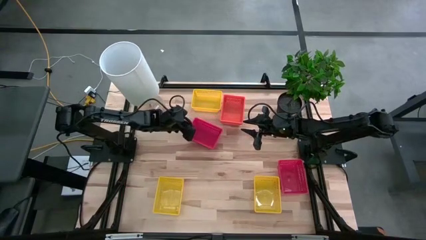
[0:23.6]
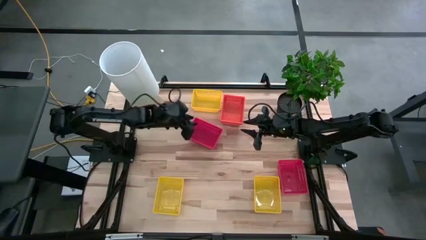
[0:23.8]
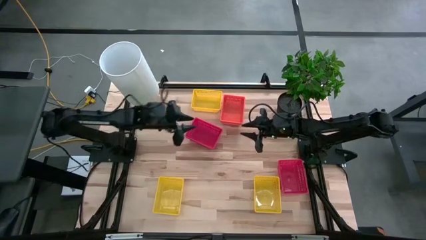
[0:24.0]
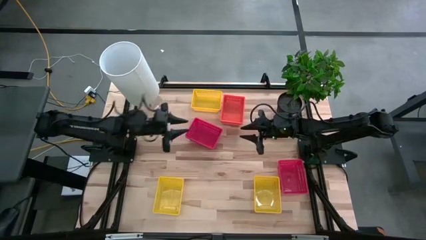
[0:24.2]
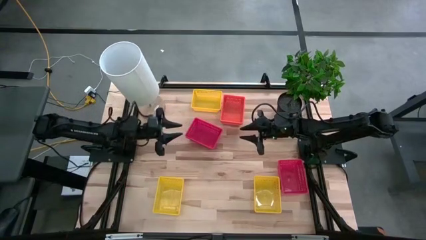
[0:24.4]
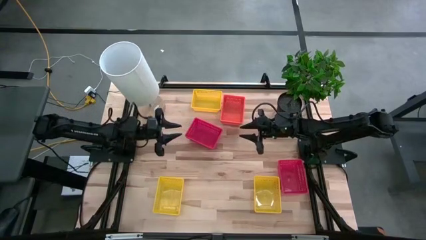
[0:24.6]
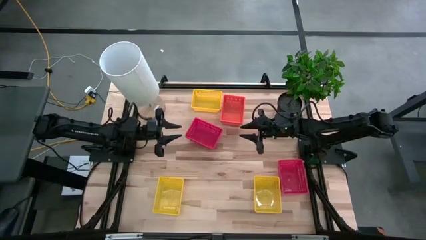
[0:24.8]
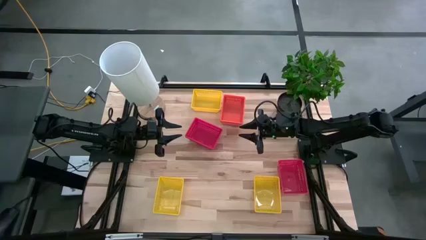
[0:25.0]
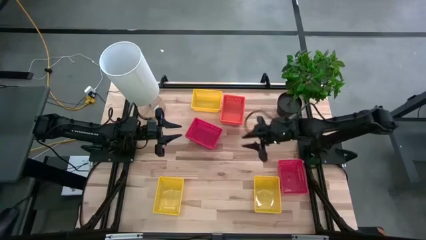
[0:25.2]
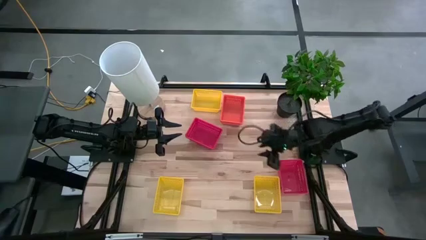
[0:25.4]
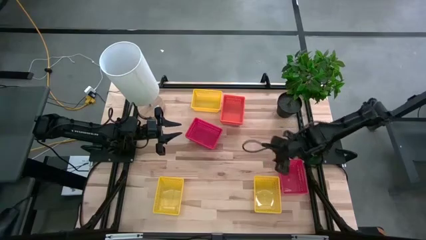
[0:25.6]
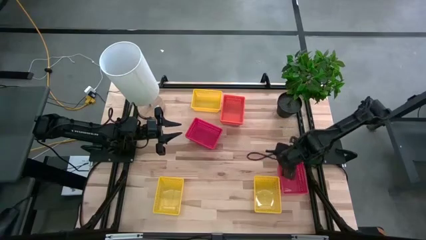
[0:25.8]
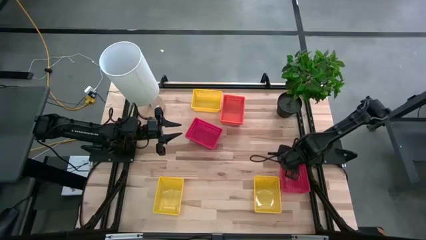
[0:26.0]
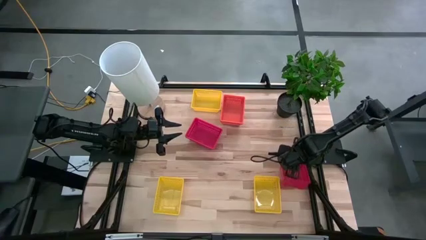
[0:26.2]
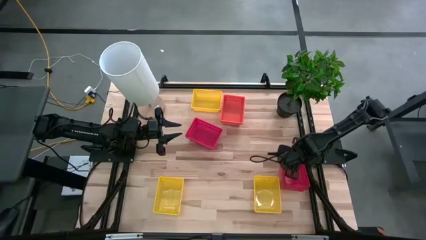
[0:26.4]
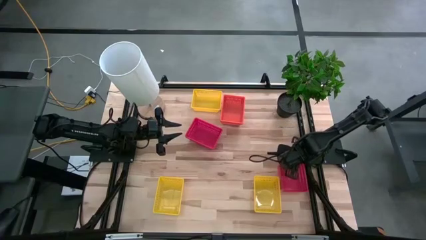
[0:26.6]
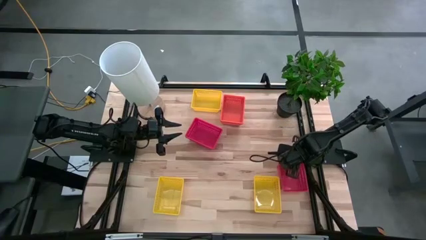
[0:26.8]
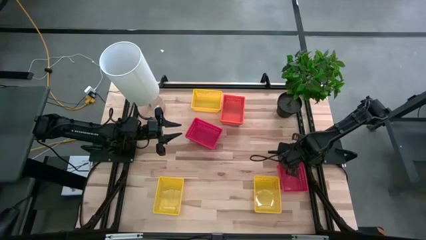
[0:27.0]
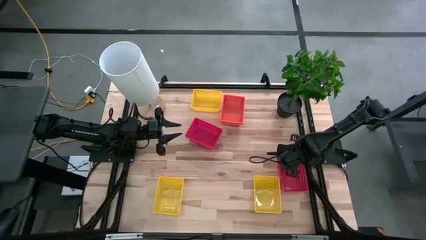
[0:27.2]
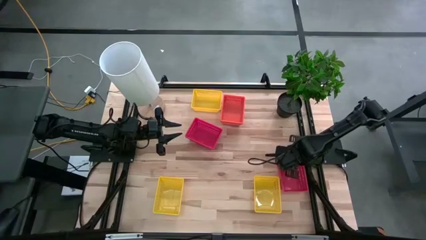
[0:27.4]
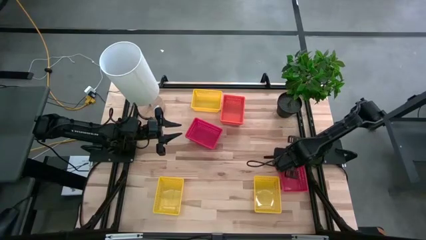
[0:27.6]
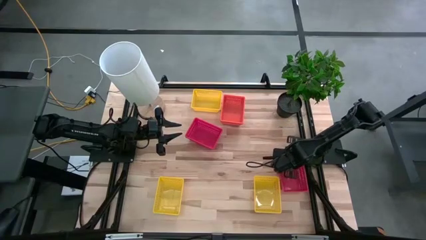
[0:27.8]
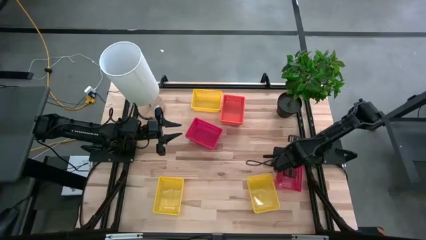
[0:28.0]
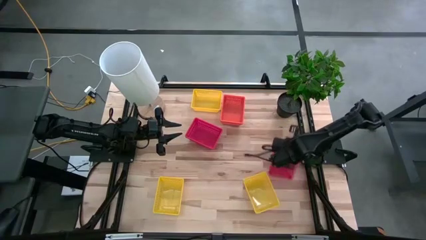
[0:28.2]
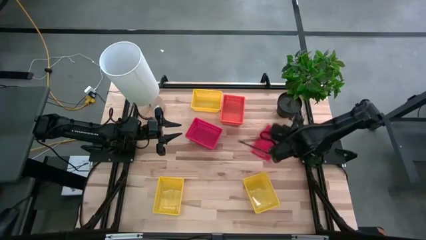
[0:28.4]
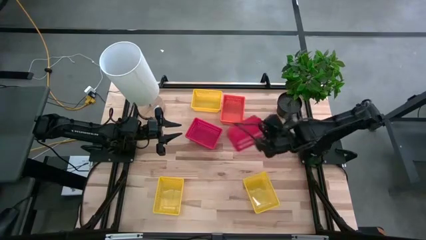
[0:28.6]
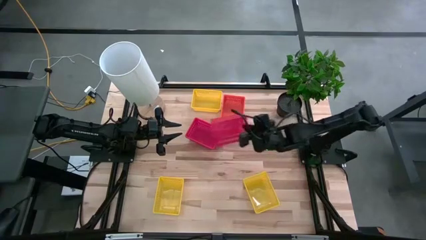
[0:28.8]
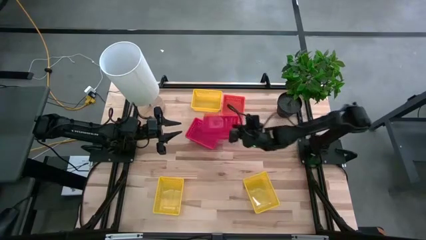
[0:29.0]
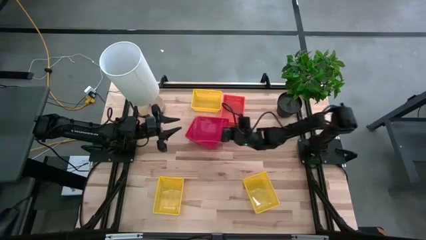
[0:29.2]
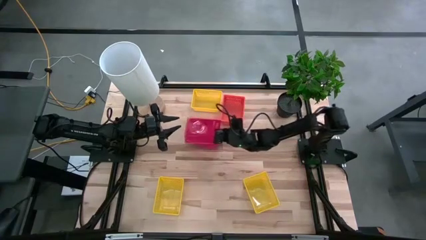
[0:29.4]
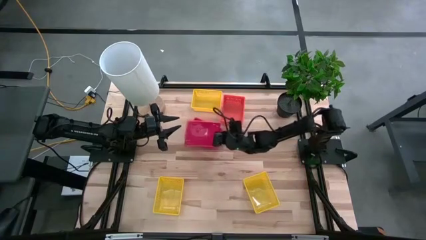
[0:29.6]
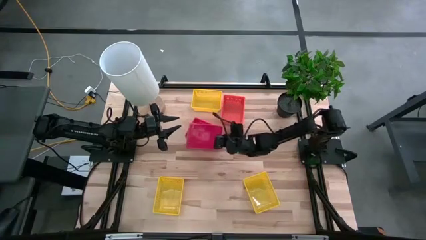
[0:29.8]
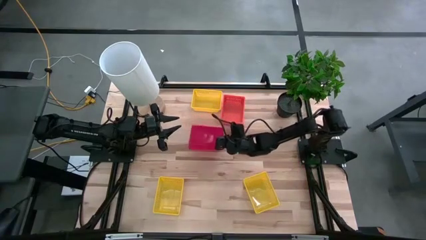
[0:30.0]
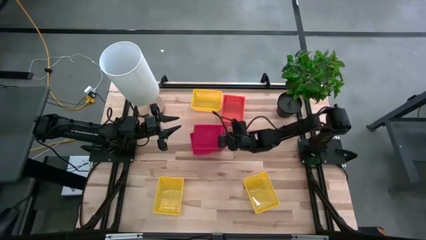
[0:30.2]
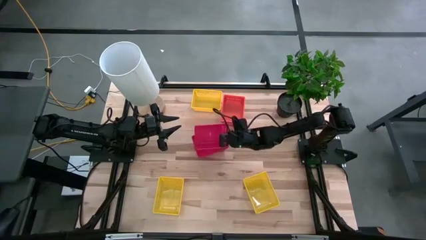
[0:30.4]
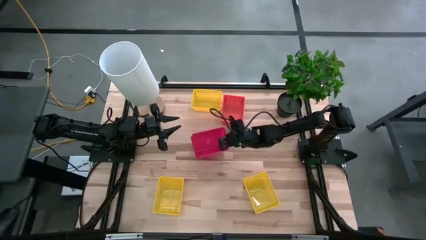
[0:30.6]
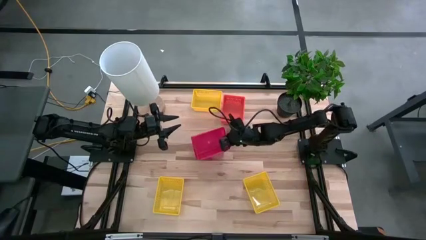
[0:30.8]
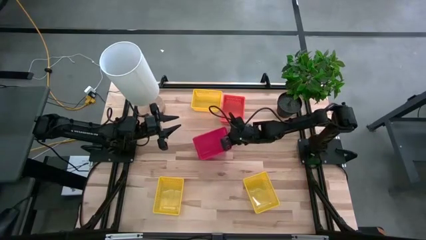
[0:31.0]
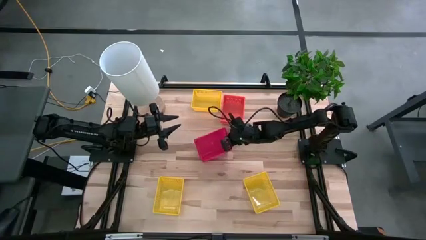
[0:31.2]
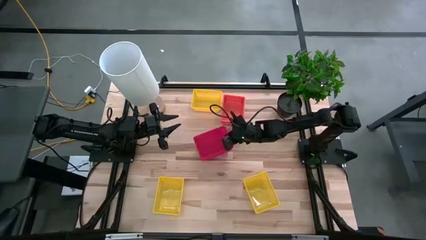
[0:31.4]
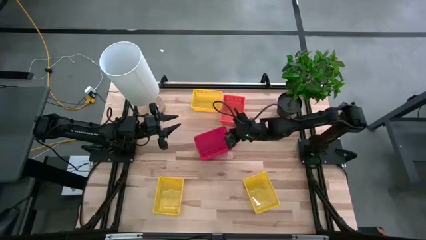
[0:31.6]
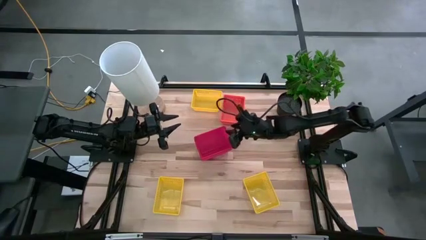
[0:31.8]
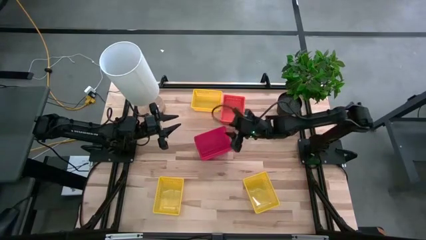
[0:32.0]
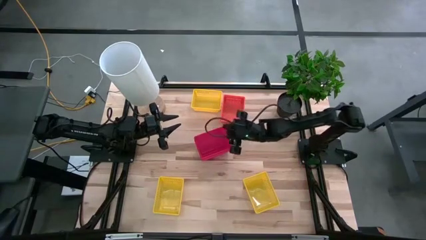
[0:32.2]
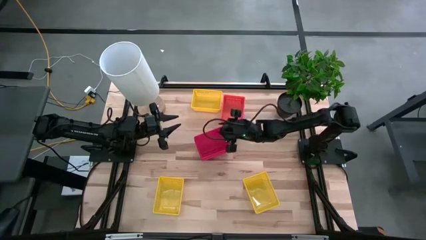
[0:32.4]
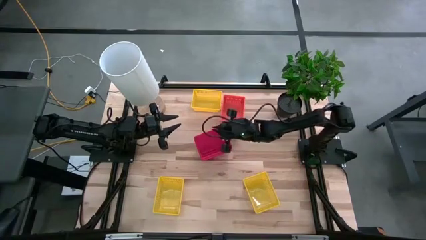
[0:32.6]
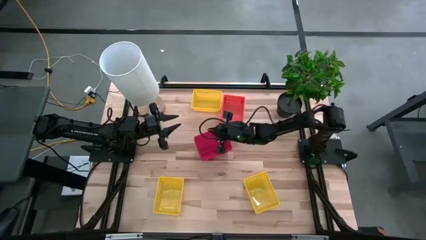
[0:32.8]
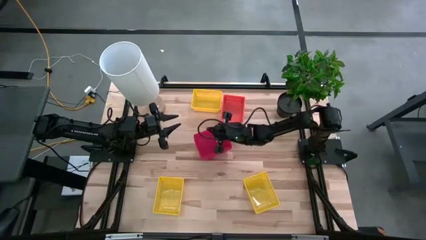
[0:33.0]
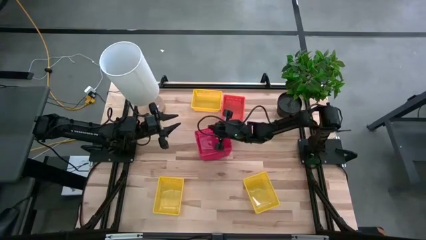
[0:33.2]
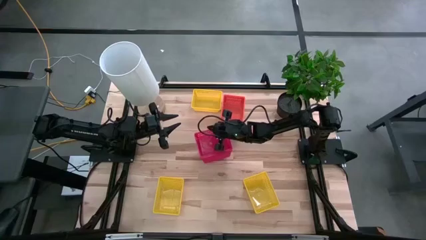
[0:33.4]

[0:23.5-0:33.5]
Stack the right red bin on the top red bin

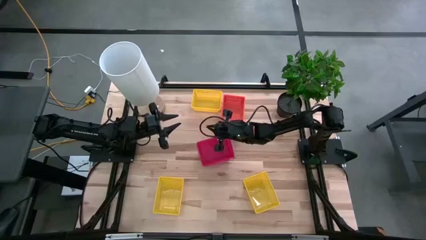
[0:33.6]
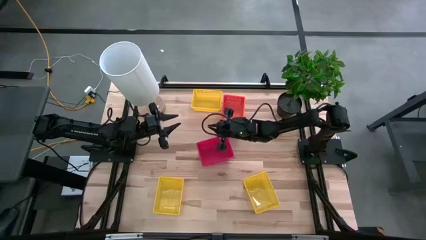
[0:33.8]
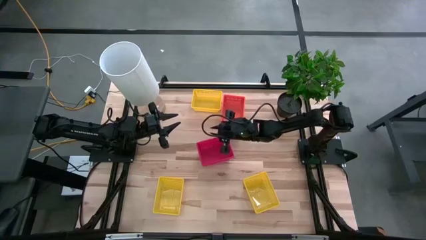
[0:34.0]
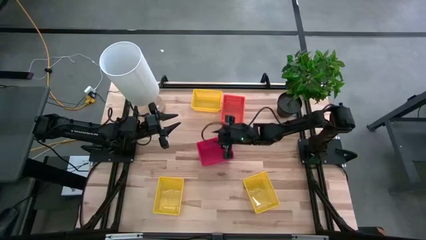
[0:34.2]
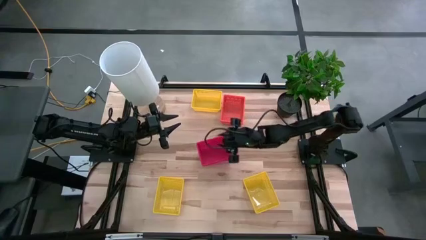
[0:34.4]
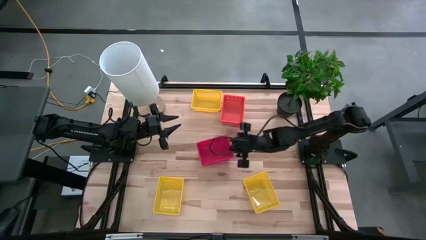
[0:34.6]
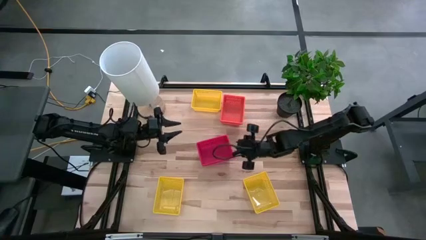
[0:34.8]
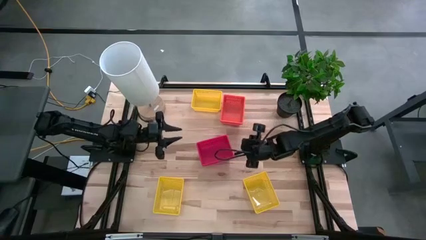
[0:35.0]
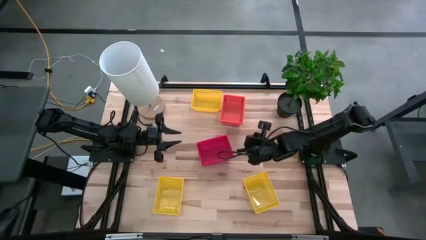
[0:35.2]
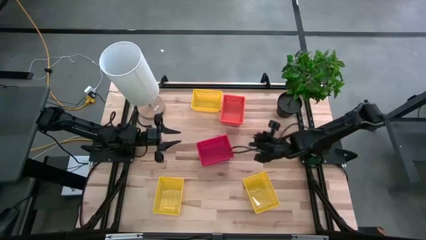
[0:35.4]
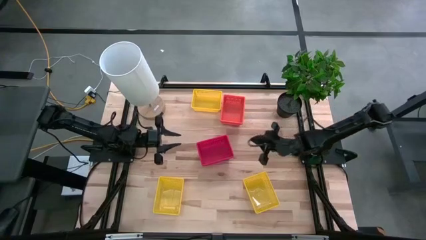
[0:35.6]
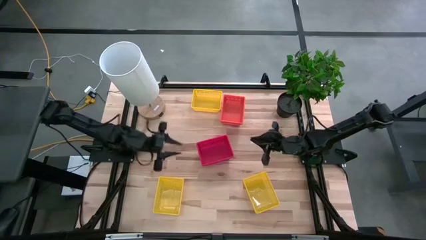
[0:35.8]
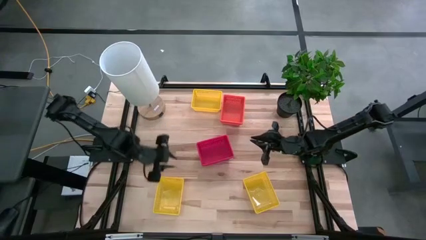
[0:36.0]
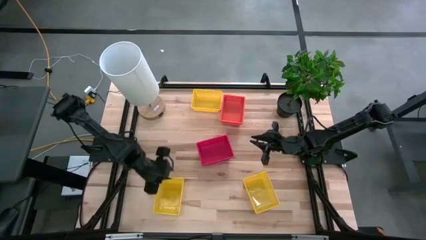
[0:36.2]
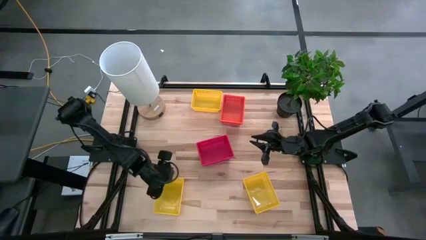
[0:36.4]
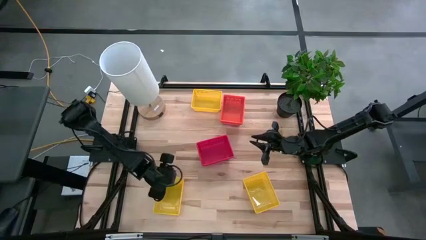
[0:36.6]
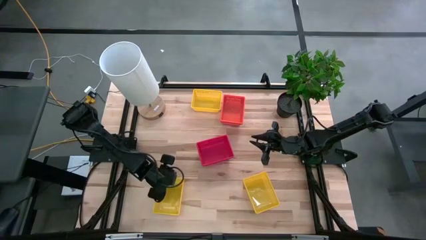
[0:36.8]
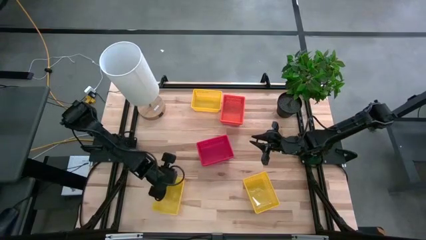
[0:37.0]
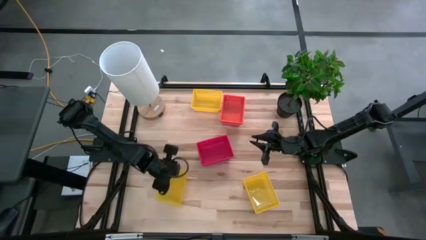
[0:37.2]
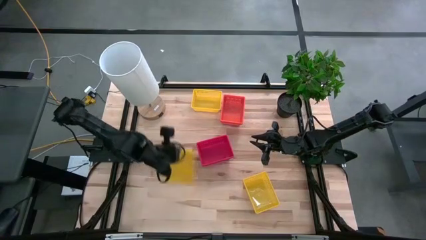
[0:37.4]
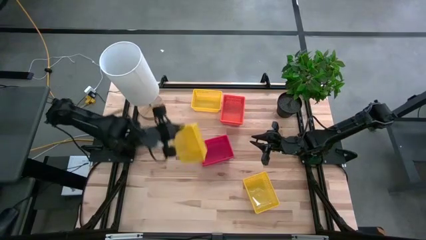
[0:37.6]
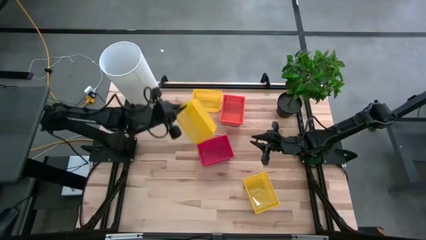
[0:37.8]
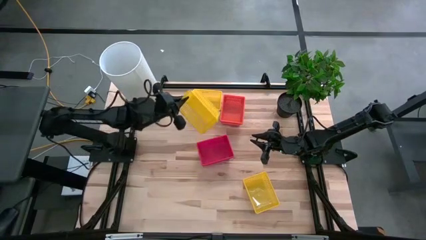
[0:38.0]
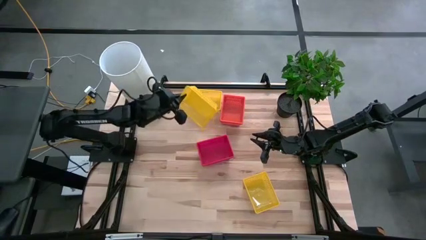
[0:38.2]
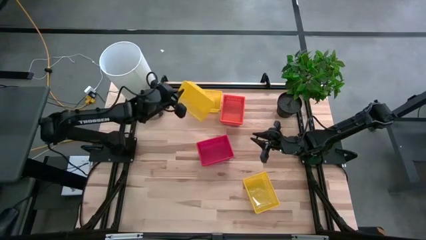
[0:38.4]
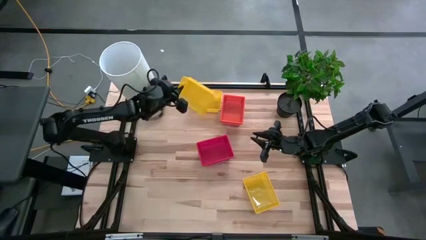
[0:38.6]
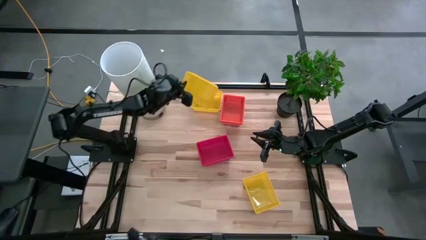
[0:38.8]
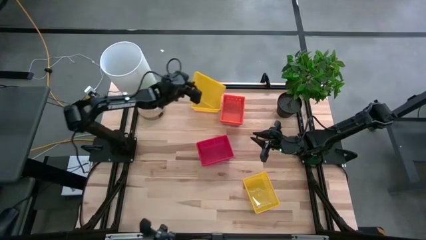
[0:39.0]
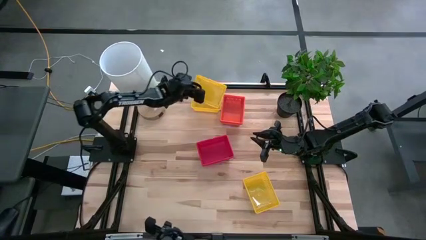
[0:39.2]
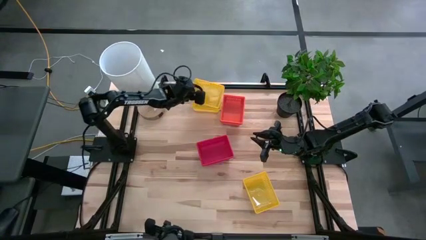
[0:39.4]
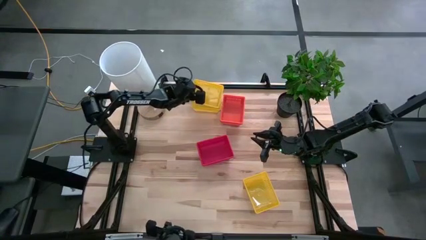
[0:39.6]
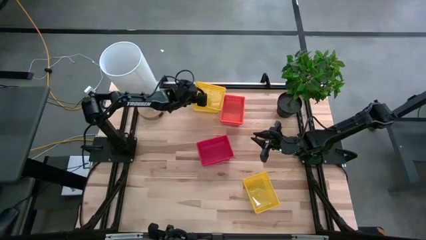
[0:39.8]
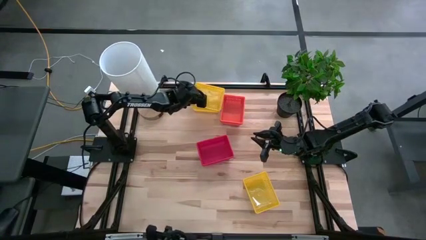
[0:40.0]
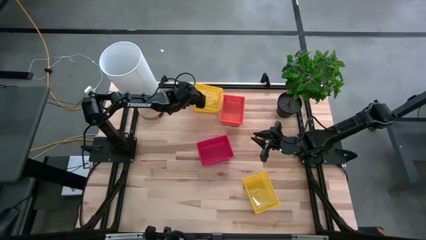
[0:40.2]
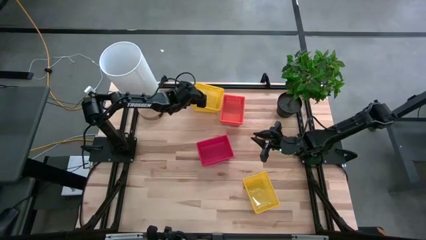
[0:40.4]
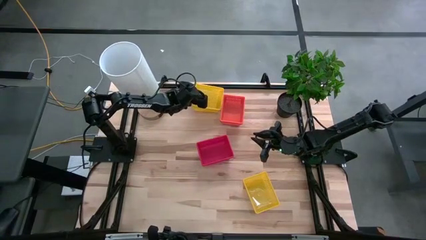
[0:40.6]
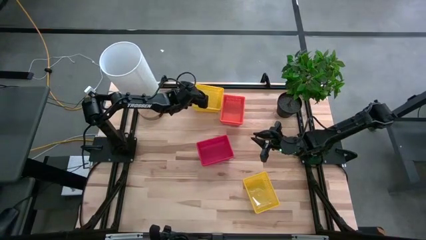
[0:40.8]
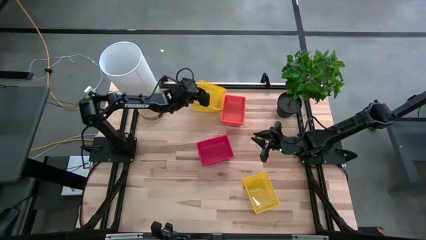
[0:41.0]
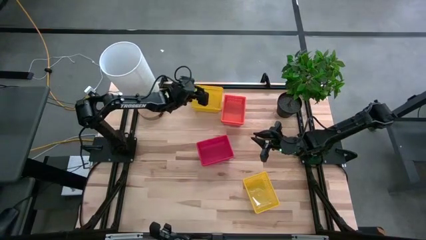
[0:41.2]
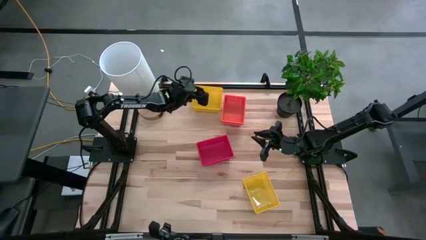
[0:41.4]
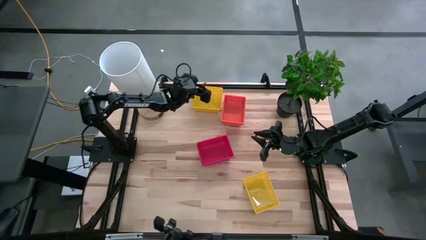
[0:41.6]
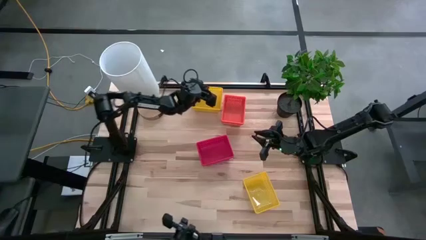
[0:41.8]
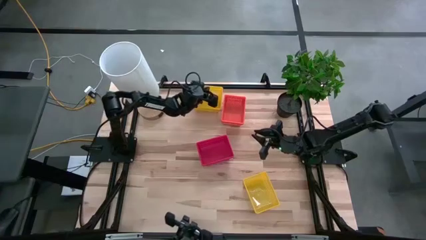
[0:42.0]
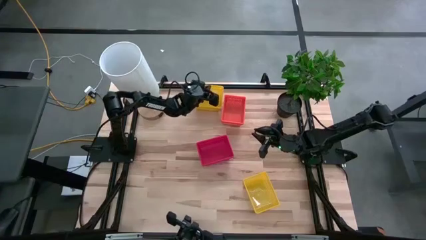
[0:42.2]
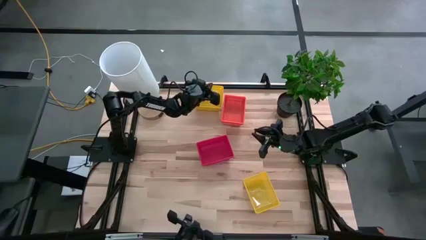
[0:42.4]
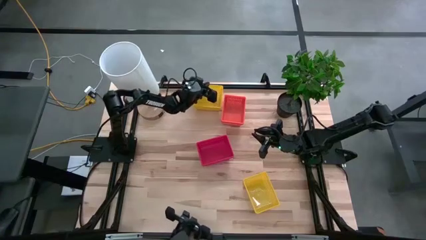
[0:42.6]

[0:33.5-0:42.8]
Stack the left yellow bin on the top yellow bin
